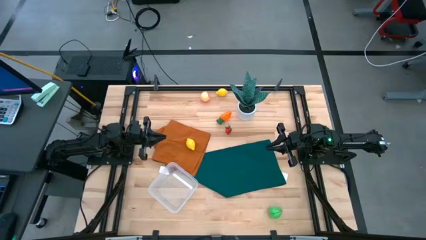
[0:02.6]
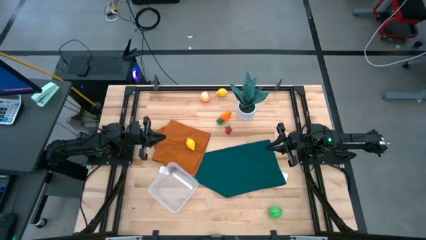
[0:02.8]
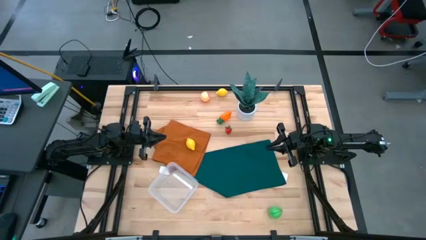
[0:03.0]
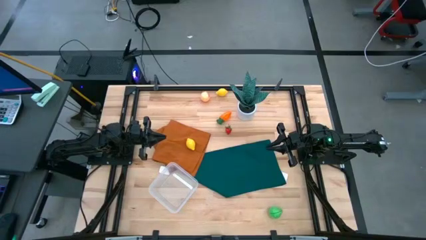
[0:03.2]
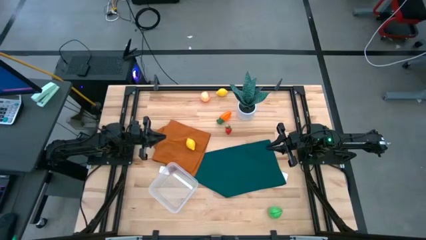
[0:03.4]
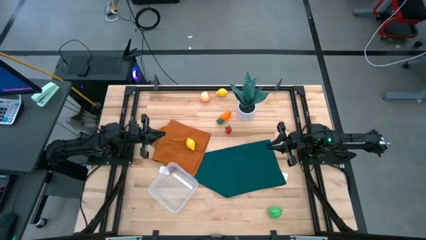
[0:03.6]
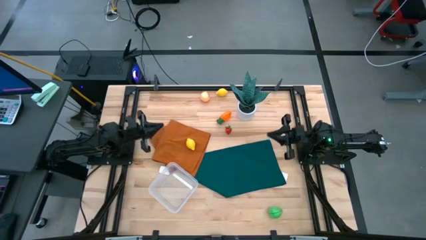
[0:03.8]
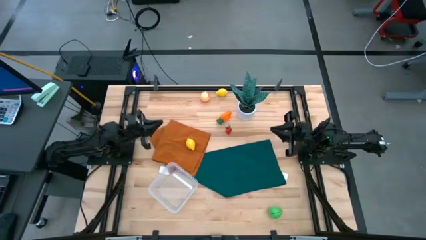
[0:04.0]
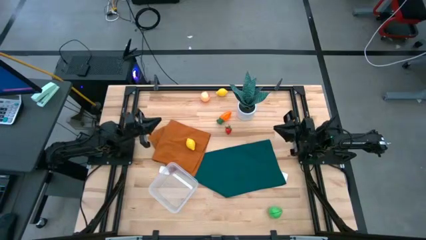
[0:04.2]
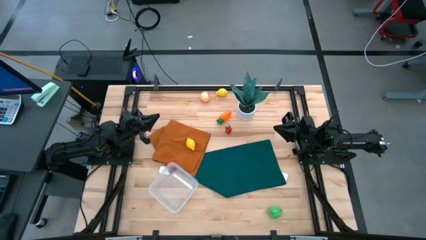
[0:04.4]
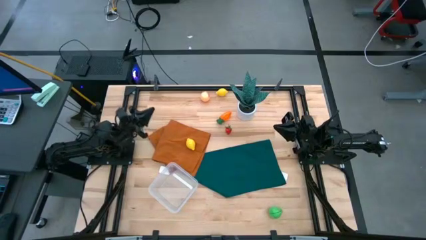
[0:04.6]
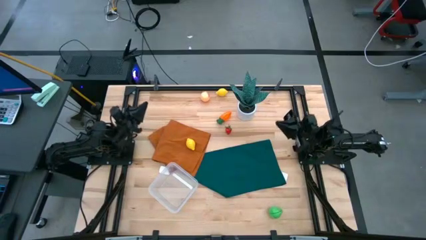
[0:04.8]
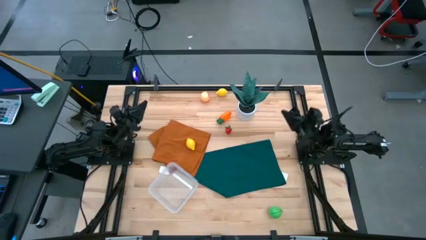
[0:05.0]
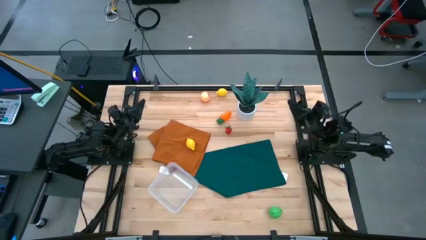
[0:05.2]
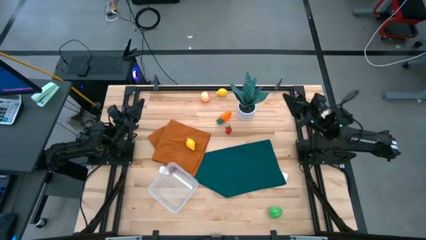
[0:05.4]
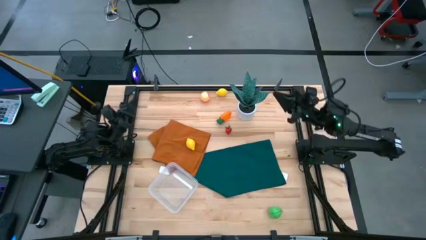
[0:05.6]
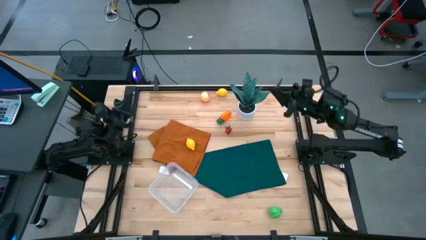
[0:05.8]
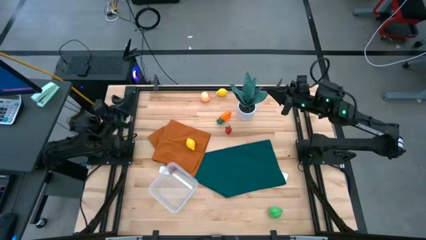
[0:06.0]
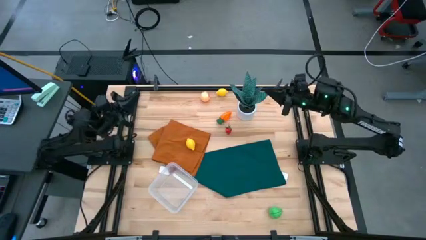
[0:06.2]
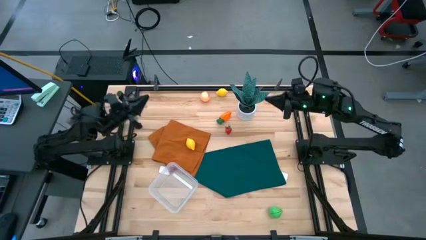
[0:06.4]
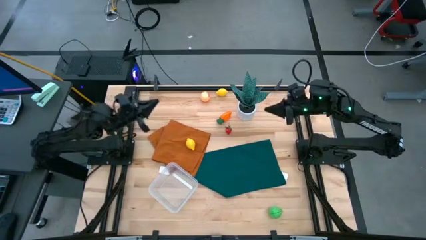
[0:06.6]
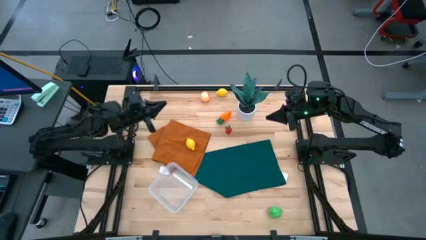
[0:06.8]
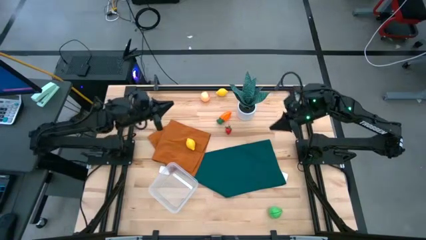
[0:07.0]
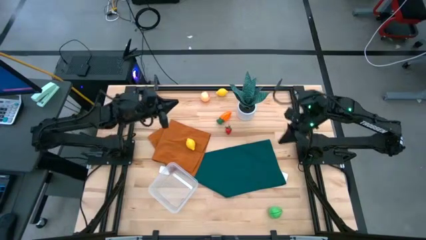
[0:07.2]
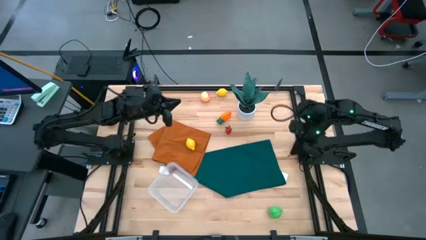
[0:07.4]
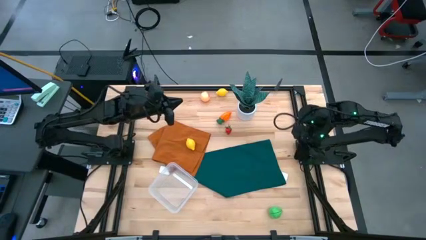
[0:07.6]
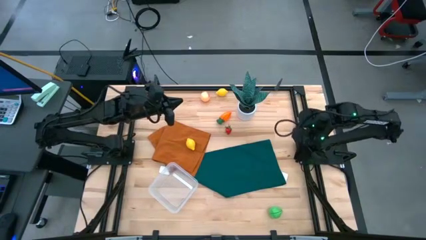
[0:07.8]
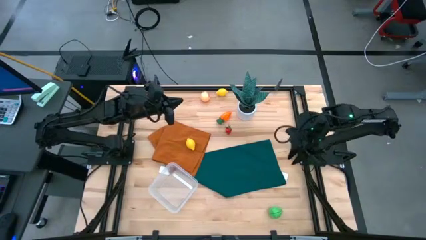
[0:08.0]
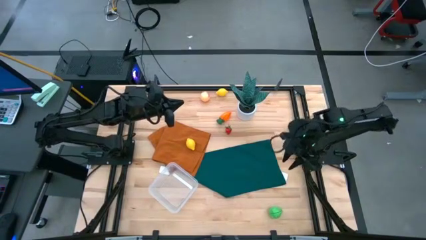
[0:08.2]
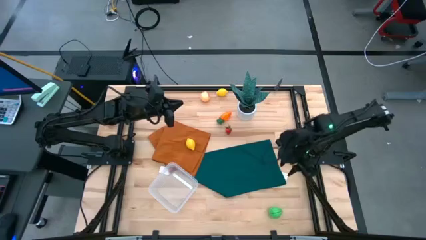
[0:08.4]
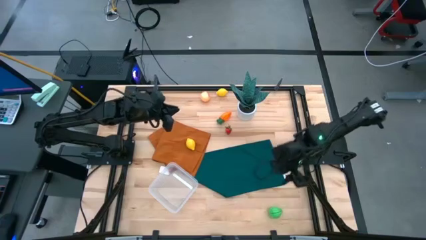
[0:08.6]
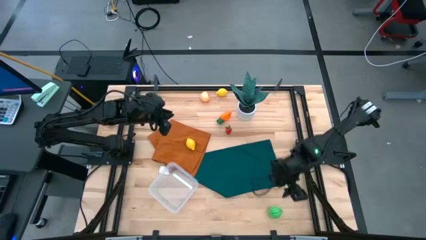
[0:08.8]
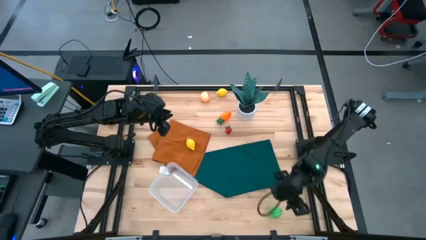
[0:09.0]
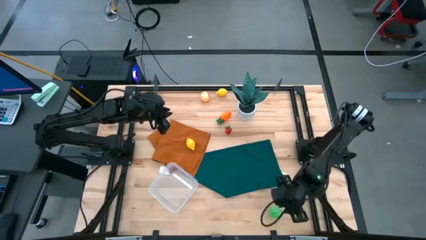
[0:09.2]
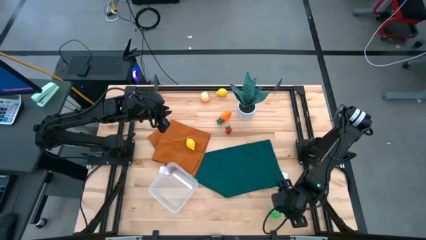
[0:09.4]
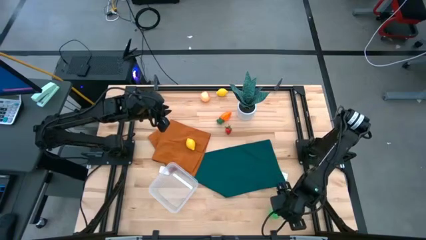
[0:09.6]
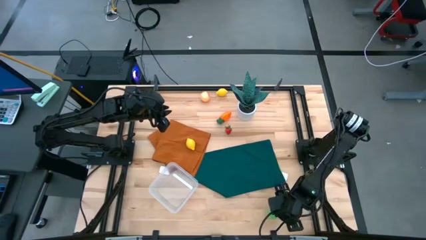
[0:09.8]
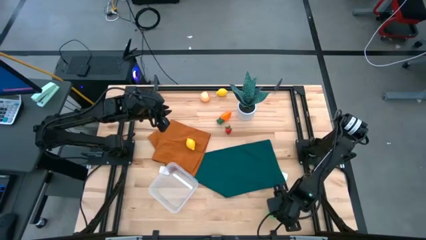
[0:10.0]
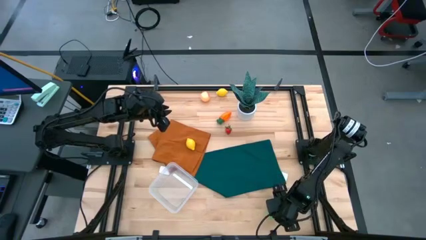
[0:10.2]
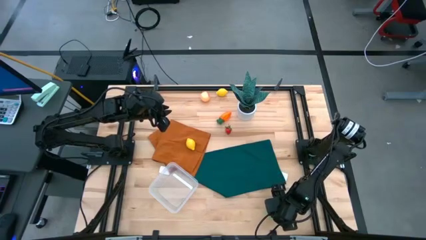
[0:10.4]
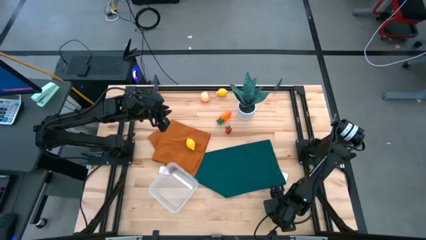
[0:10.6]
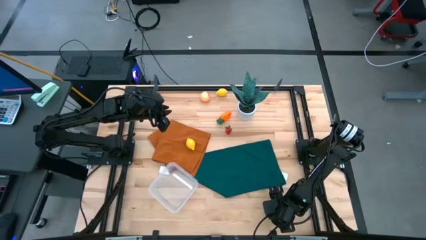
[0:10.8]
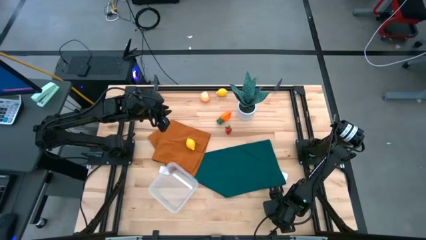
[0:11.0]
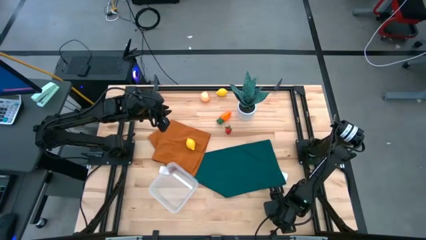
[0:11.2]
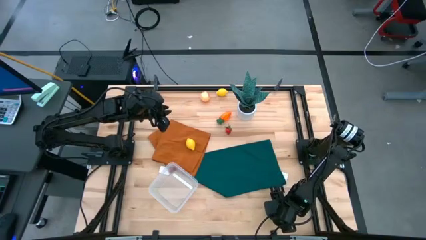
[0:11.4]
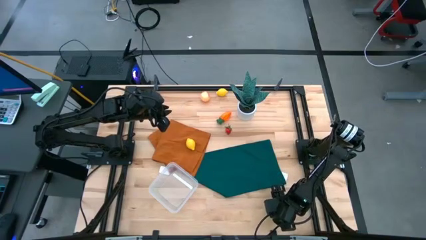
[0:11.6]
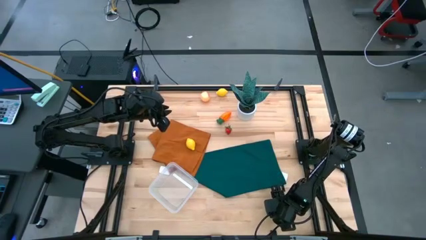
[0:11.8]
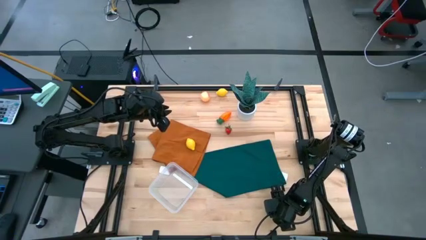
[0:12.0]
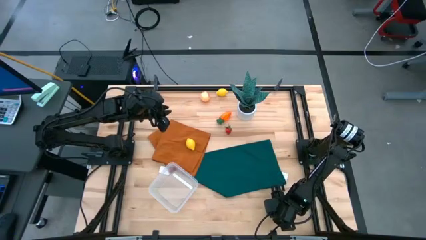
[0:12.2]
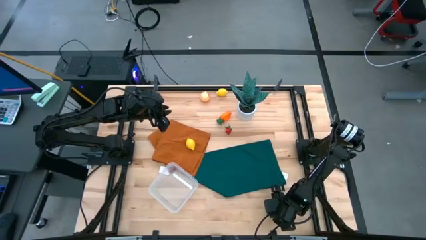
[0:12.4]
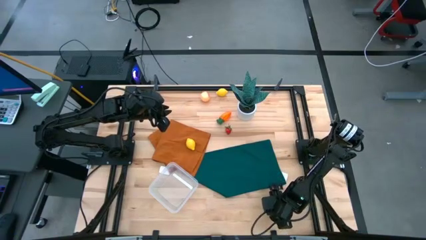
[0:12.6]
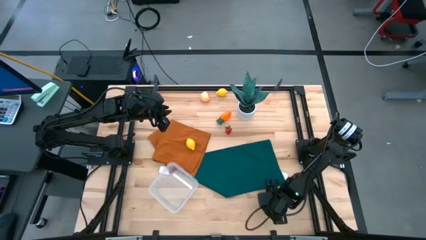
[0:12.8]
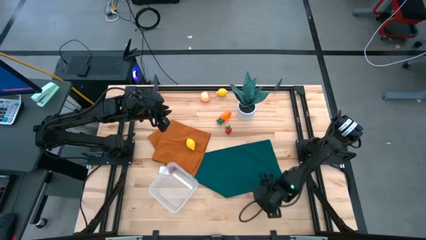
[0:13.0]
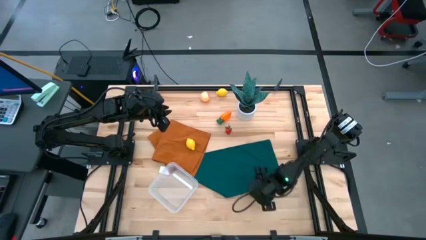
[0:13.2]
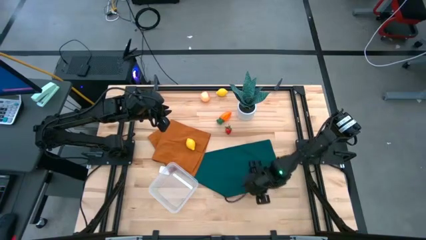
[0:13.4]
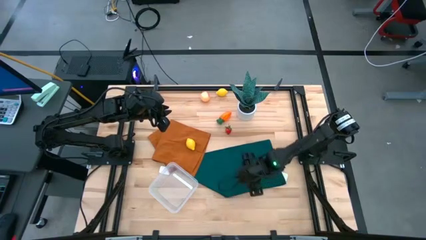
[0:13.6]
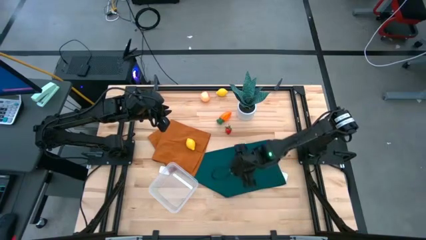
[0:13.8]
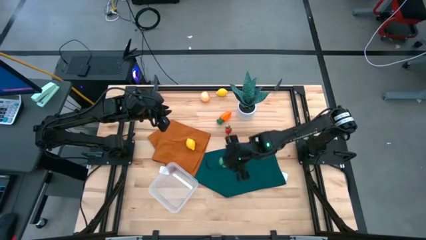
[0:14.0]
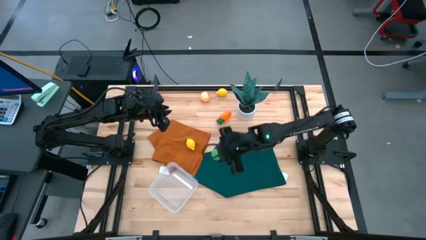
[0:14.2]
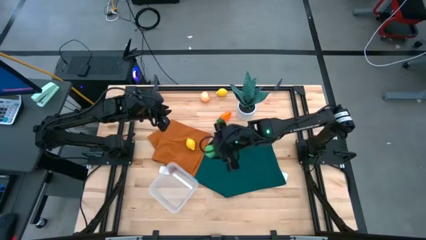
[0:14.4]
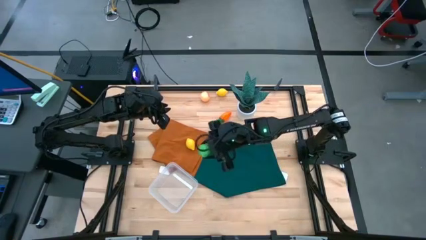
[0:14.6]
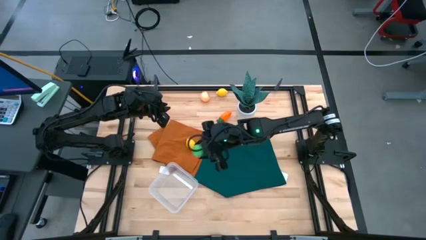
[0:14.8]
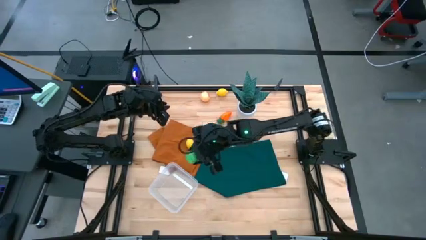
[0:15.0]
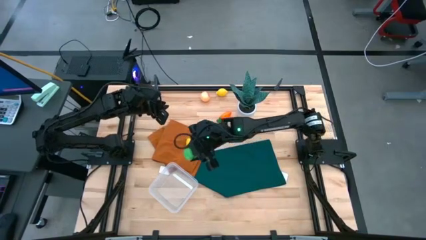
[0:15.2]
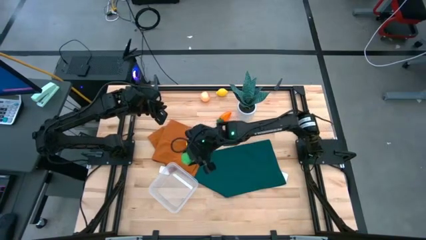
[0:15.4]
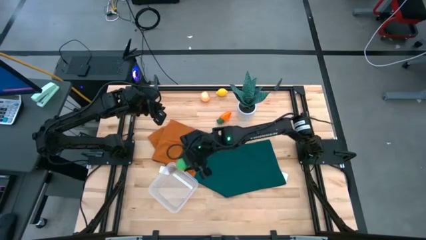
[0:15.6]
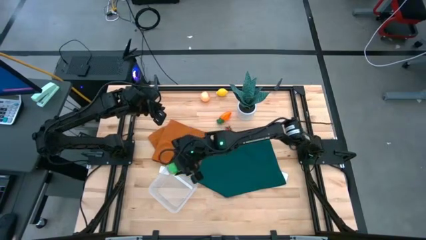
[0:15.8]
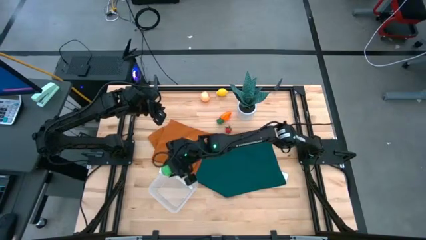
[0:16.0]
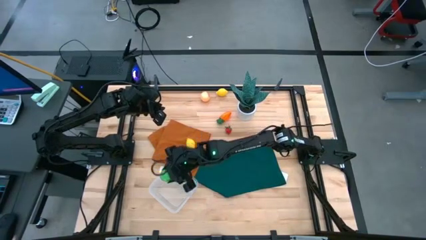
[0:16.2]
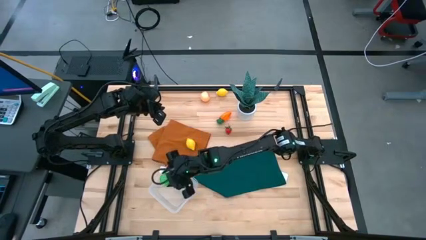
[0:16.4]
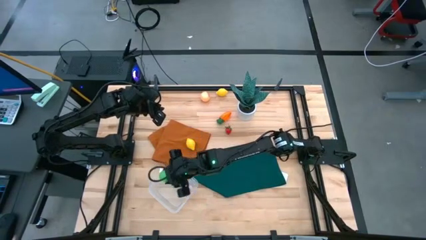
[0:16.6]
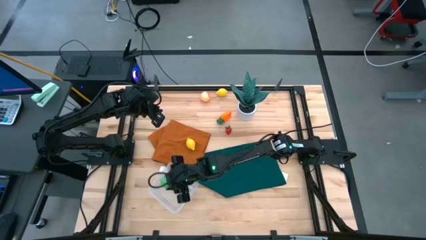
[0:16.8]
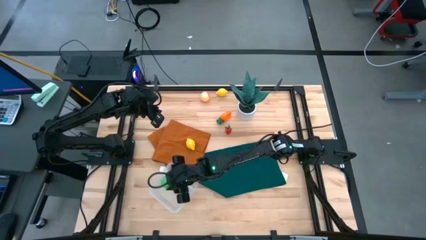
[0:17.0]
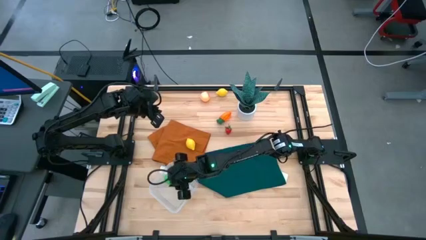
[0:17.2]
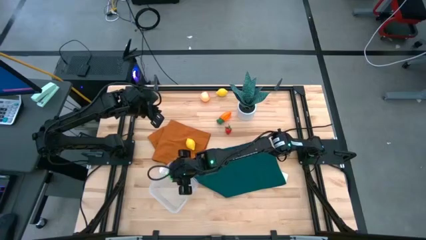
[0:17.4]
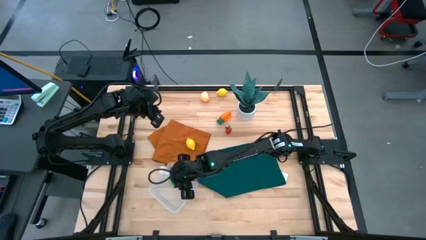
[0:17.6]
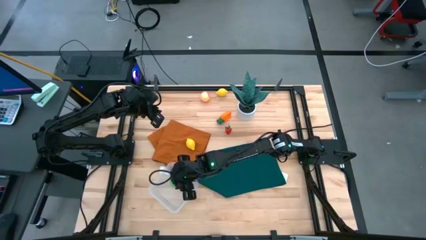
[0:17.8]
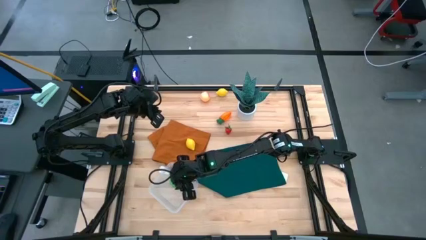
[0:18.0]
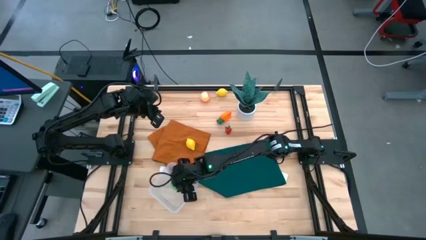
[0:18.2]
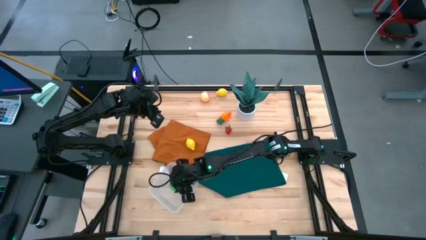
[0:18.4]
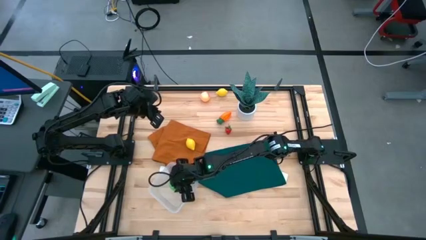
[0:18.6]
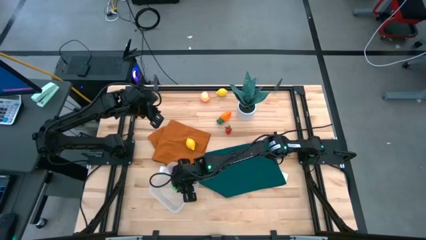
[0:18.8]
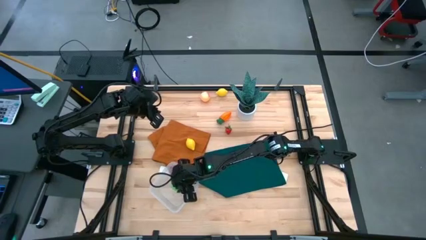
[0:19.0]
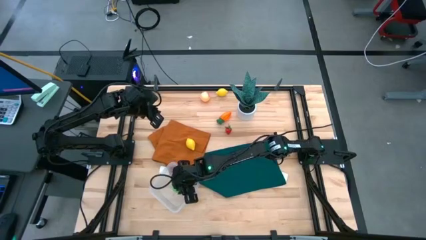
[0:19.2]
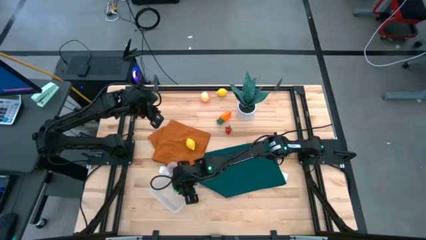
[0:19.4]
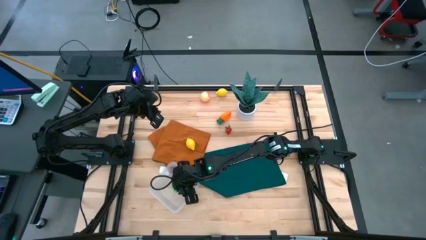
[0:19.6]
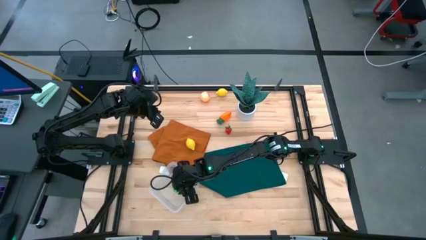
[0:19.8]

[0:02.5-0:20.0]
Task: Pick and placing Produce into tupperware
Put the pear into the transparent container
